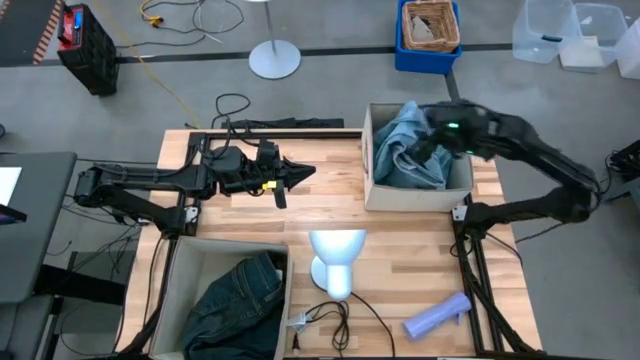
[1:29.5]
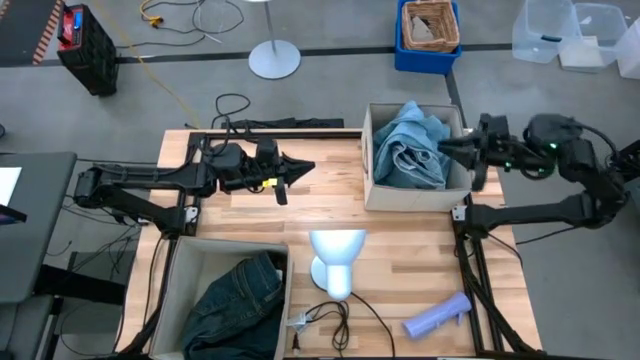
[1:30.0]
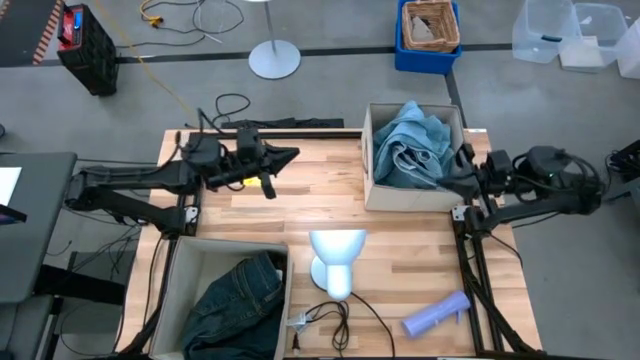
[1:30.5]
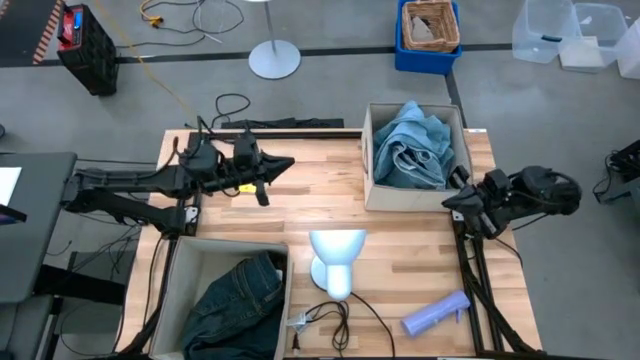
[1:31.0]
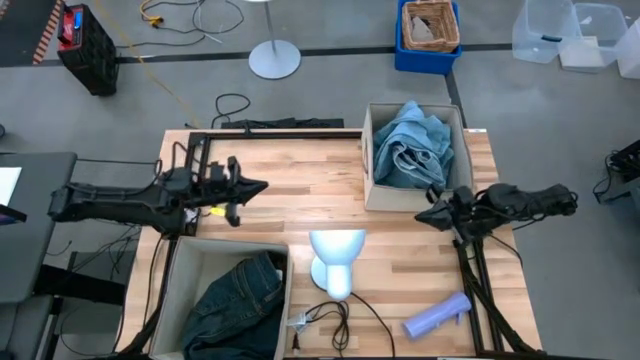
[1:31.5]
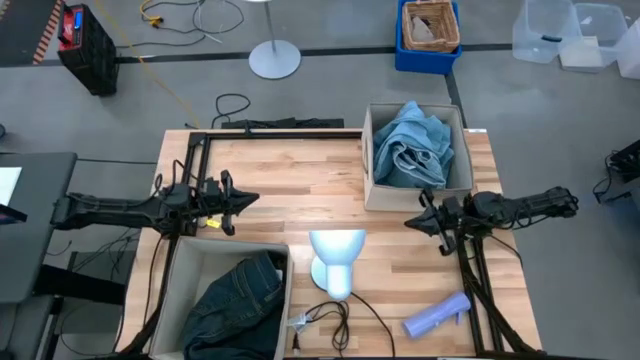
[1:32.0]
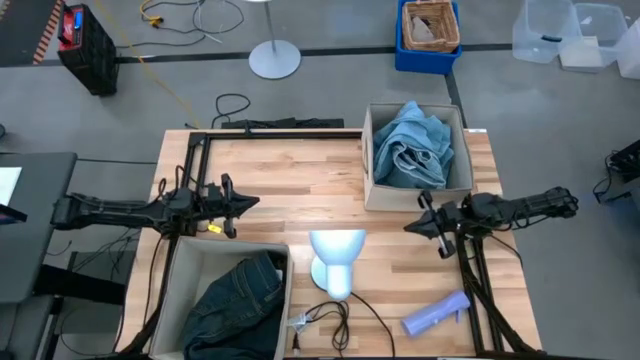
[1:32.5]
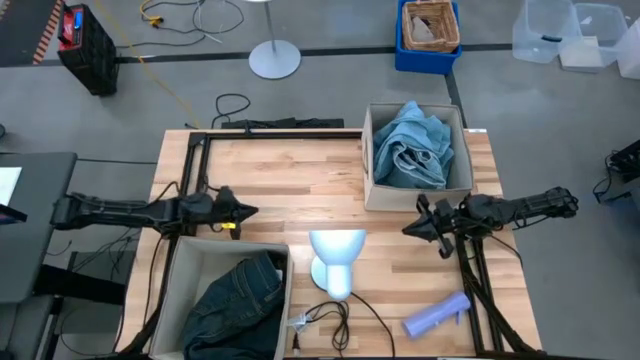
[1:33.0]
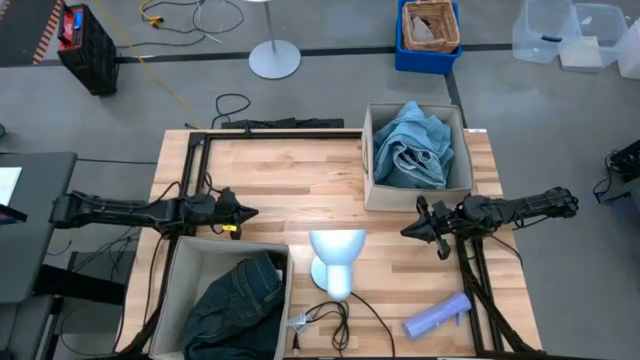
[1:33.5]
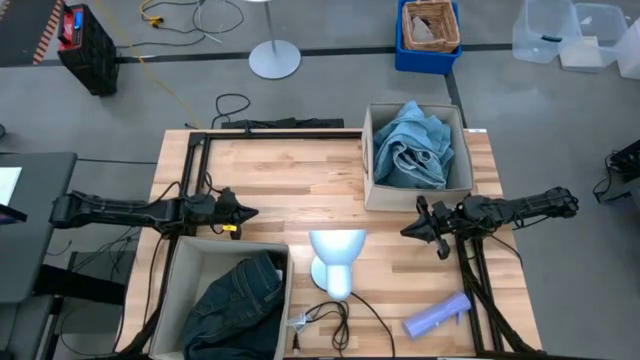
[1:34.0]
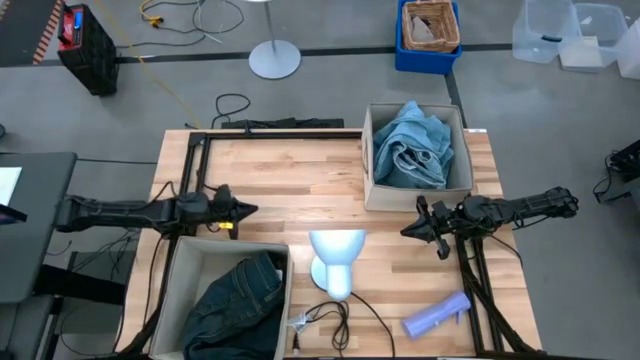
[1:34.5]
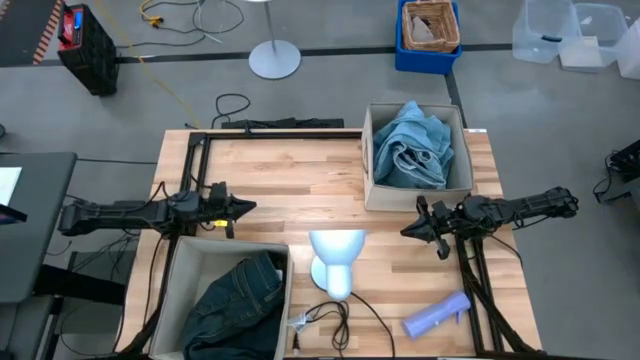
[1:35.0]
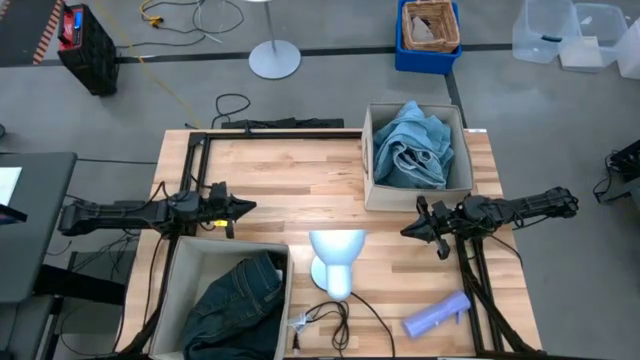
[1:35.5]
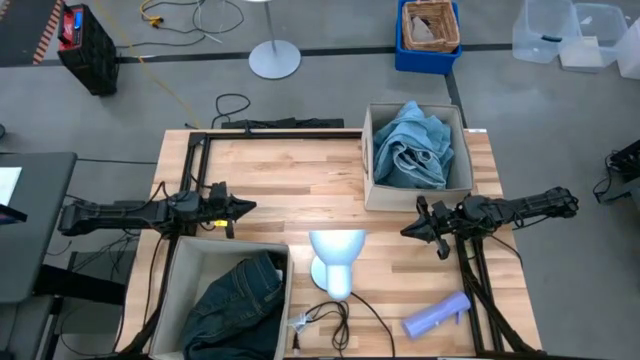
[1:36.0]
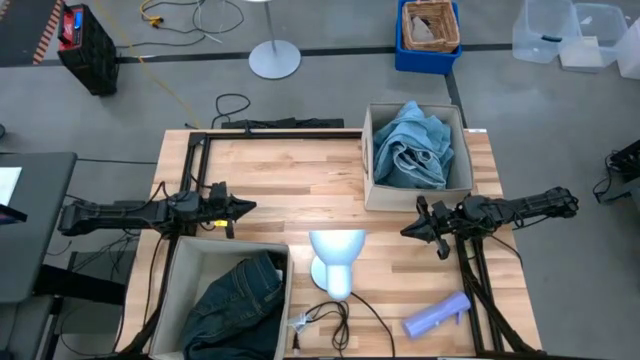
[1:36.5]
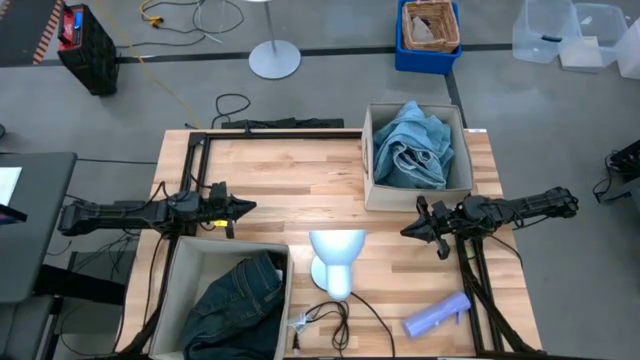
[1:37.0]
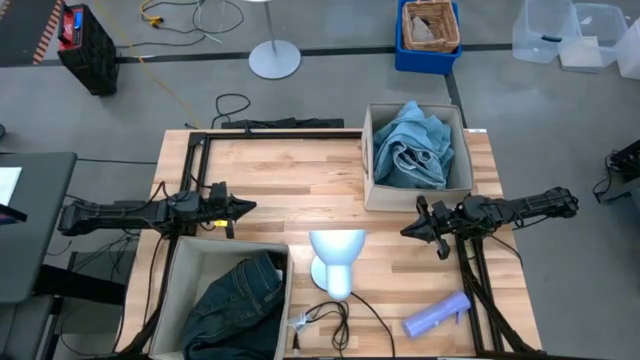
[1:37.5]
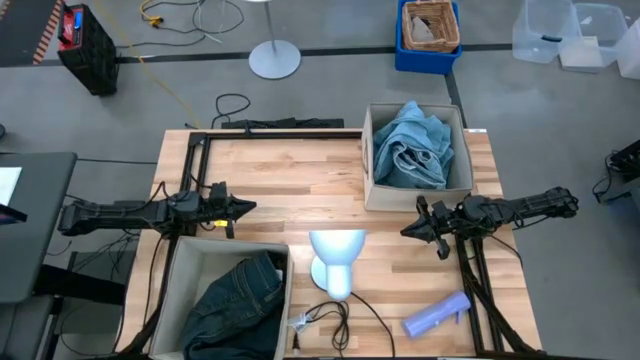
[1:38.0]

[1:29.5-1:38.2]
Task: Sort clothes
Return to Home Position

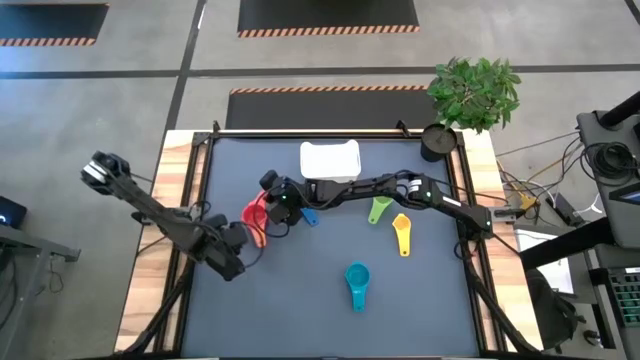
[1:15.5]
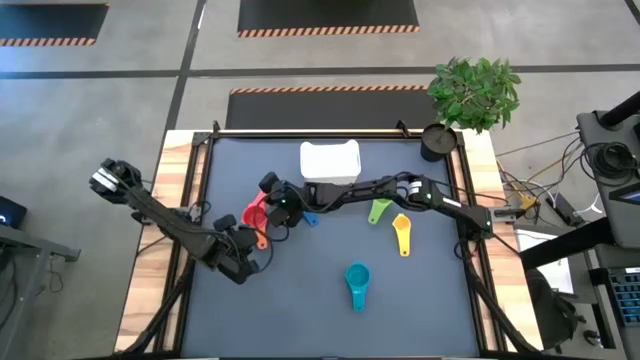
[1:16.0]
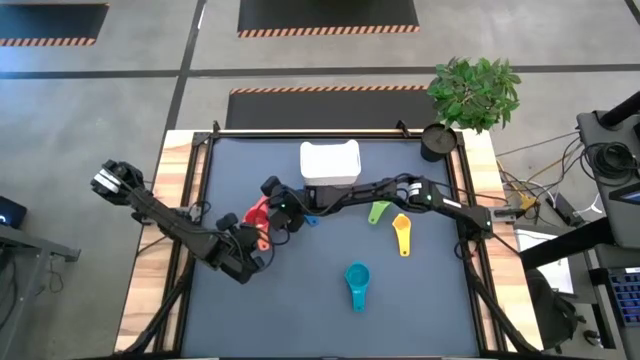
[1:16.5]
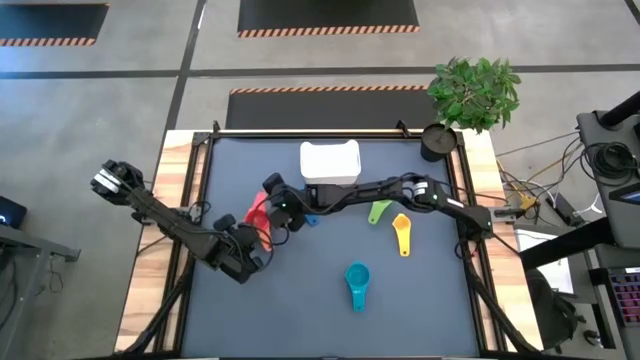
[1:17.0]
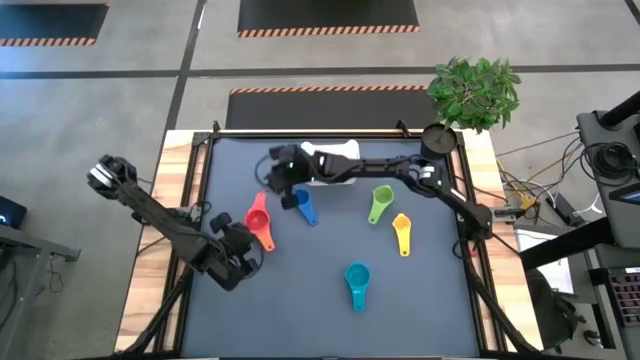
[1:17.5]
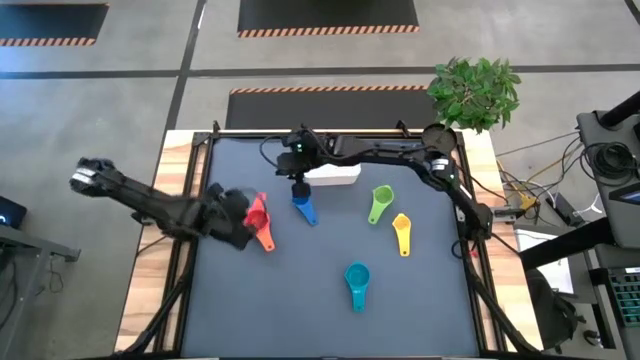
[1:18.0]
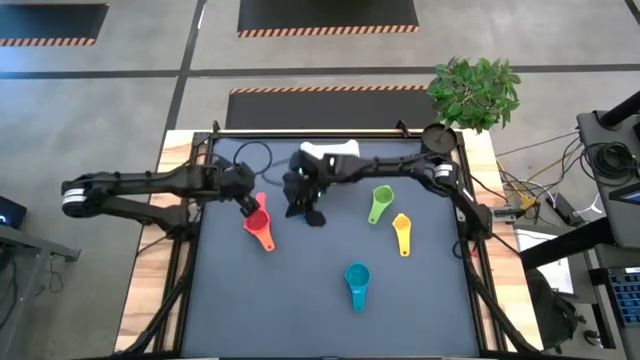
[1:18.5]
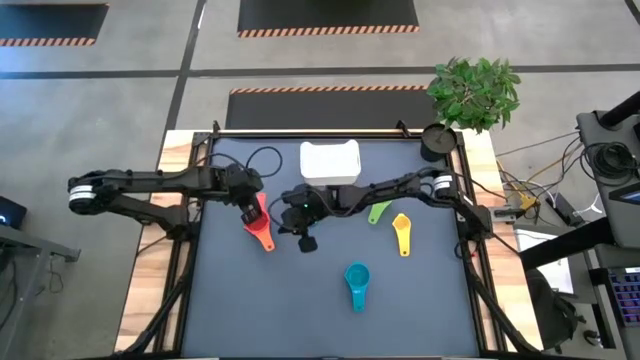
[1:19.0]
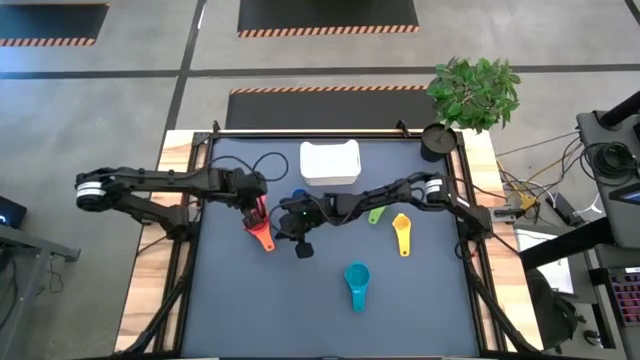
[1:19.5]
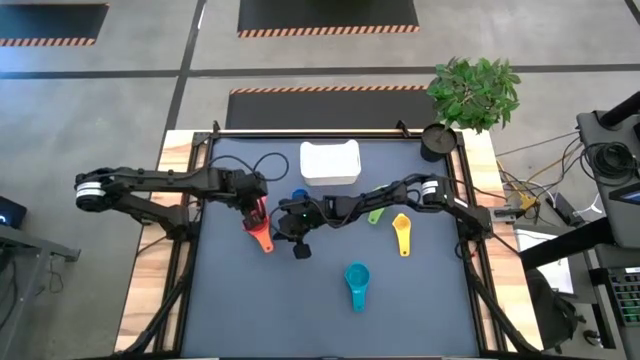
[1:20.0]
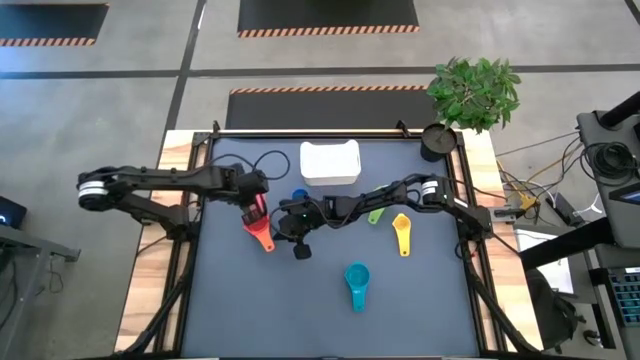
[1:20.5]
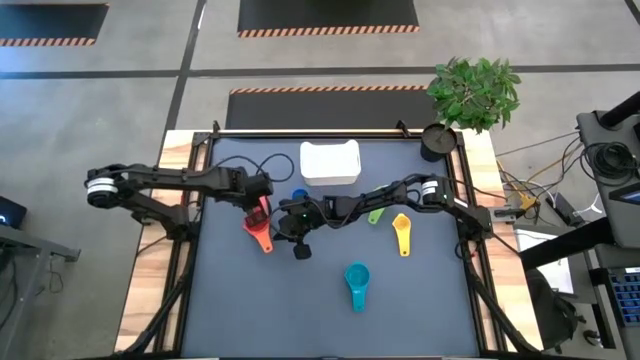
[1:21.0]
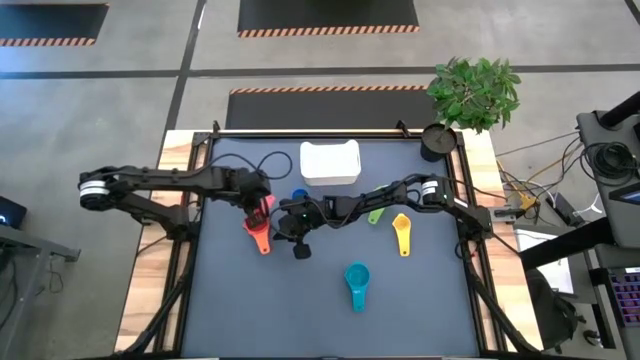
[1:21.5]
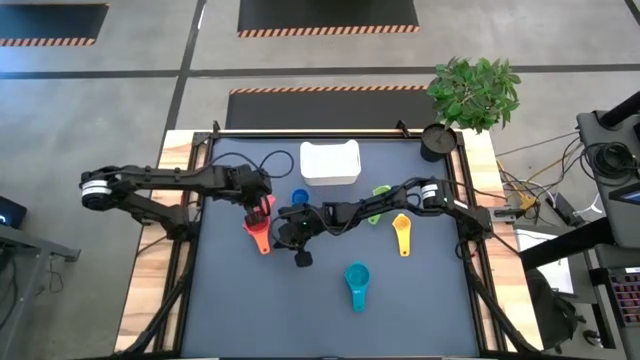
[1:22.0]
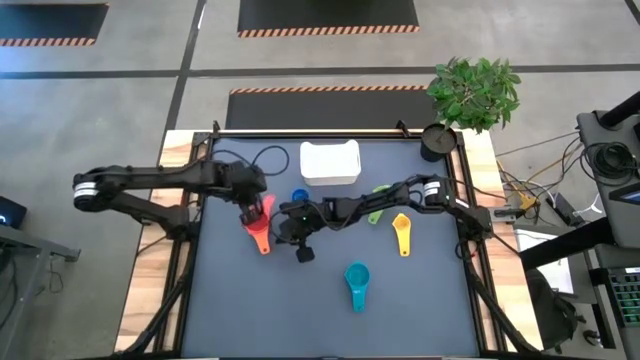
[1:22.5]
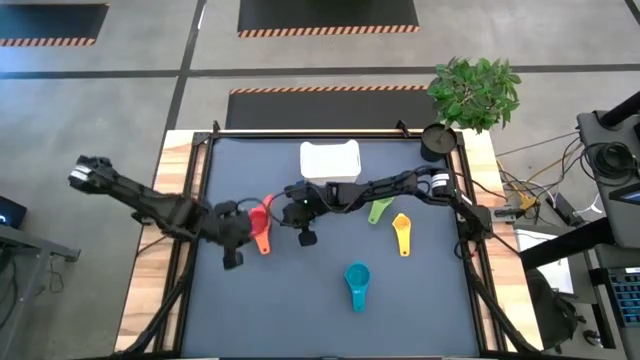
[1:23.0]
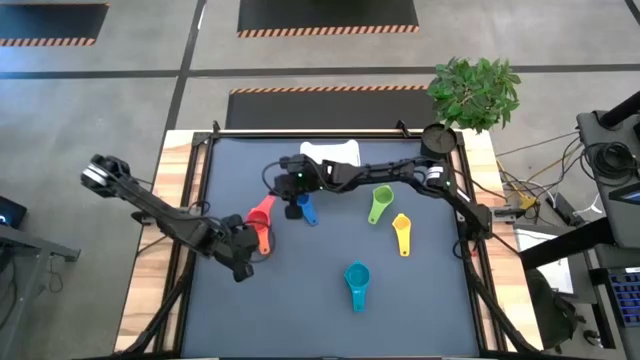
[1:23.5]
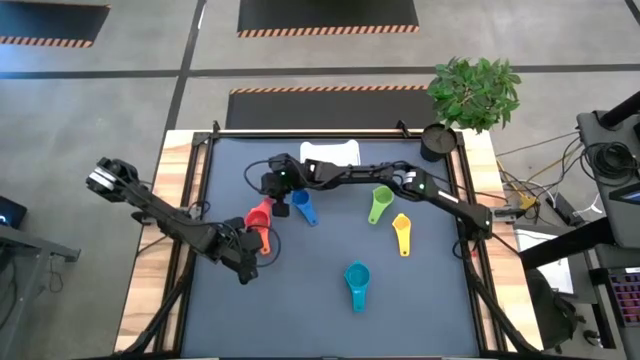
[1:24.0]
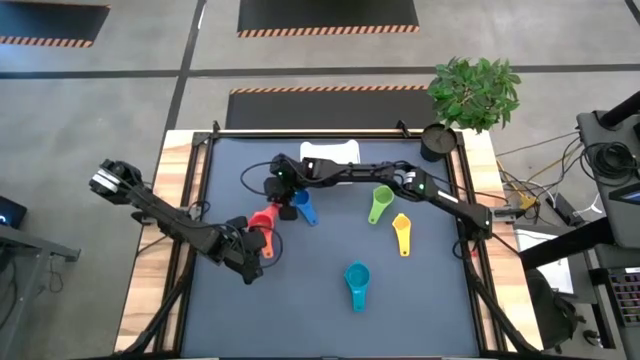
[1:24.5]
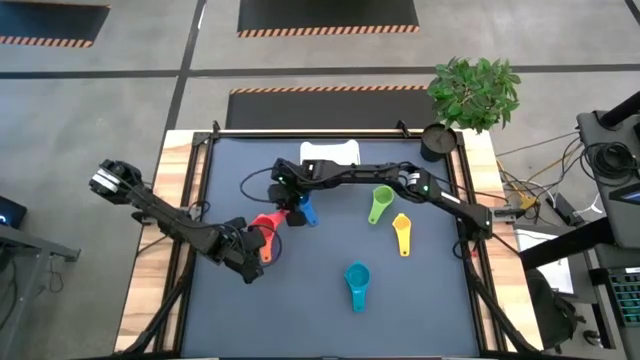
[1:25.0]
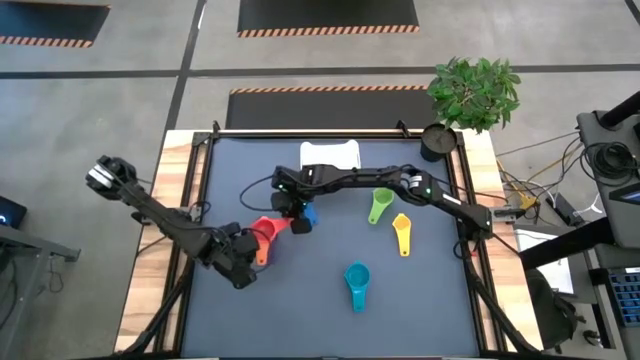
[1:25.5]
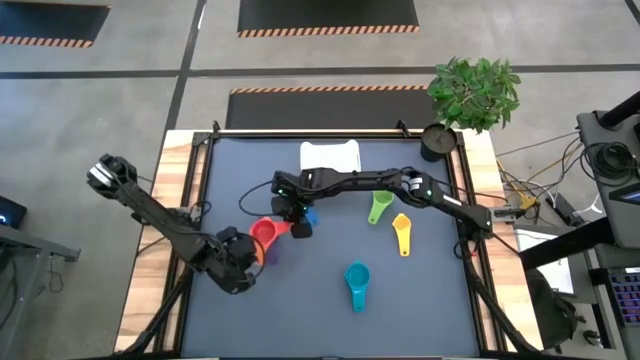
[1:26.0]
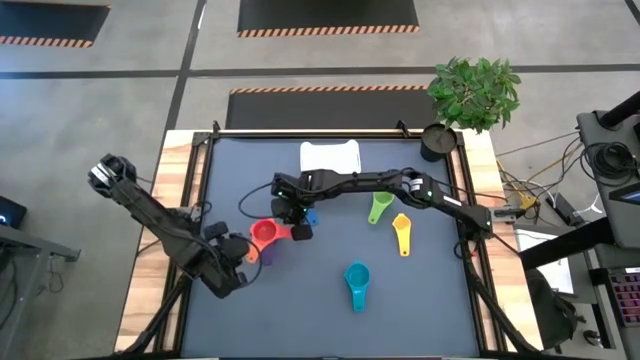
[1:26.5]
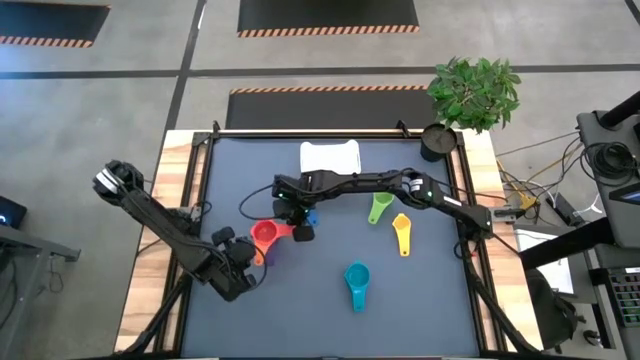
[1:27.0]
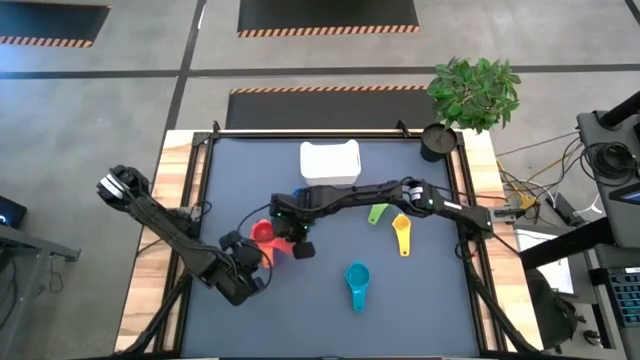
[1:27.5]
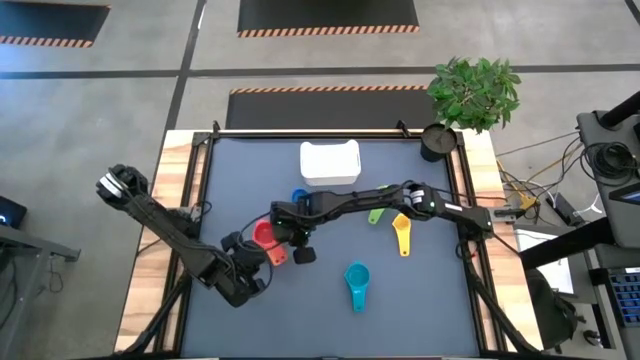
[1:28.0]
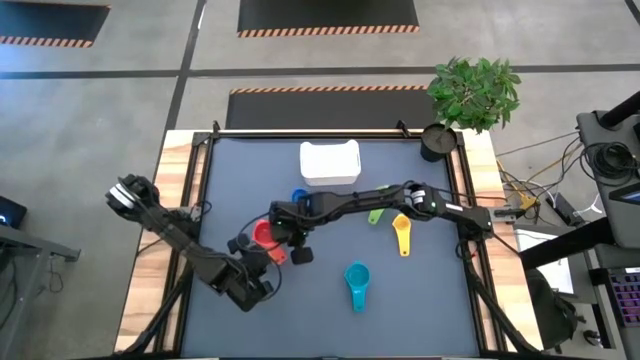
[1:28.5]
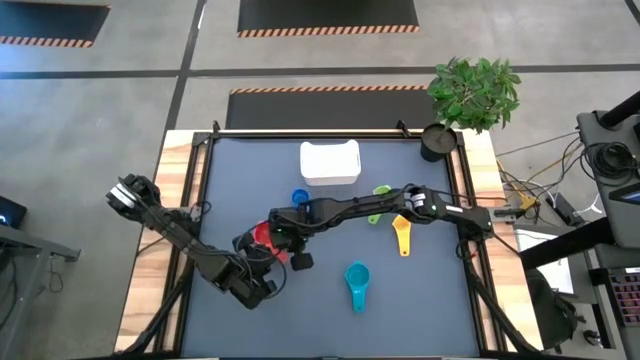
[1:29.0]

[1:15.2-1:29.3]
Task: Nest measuring cups in basket
Stack the red measuring cup on top of the orange measuring cup
